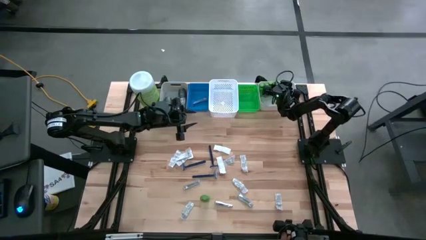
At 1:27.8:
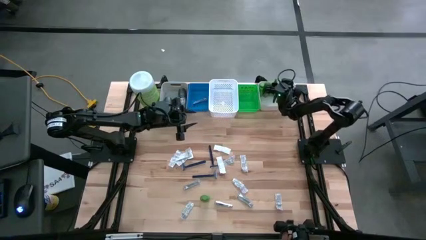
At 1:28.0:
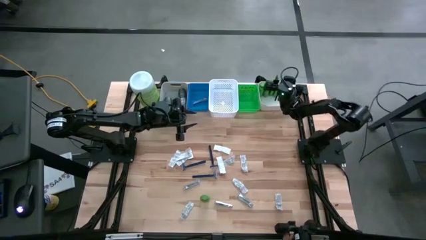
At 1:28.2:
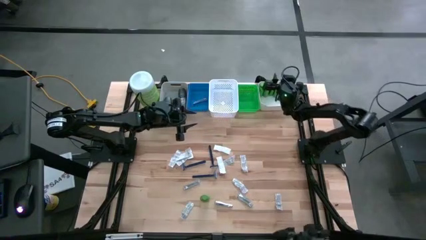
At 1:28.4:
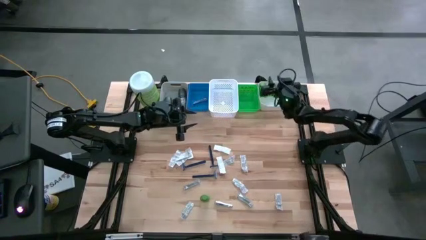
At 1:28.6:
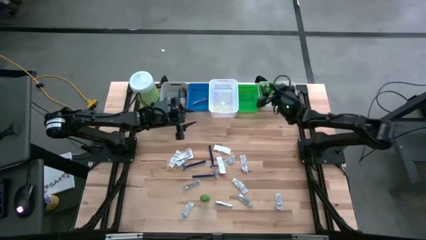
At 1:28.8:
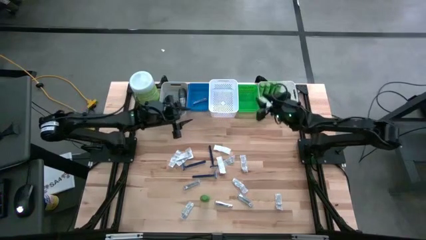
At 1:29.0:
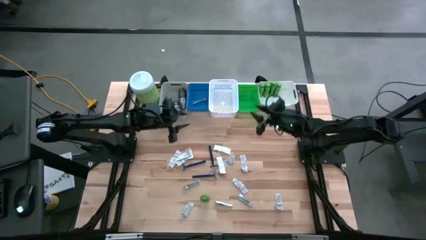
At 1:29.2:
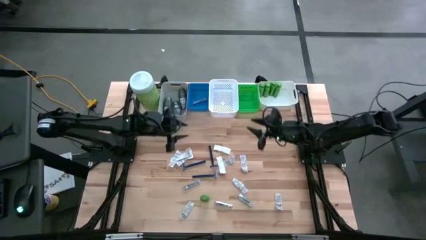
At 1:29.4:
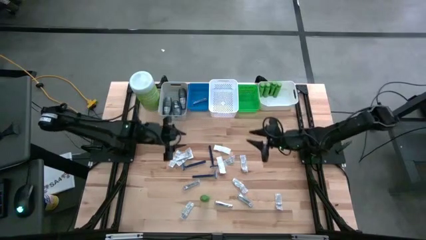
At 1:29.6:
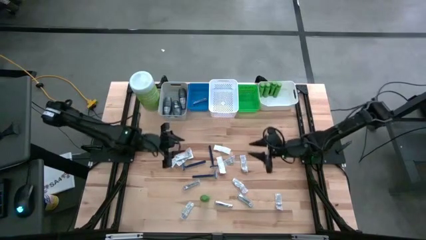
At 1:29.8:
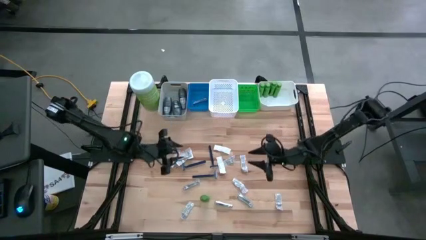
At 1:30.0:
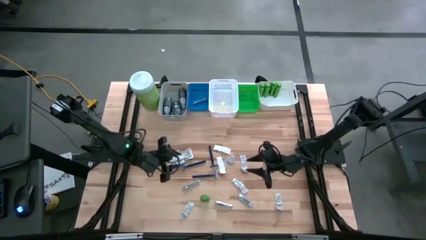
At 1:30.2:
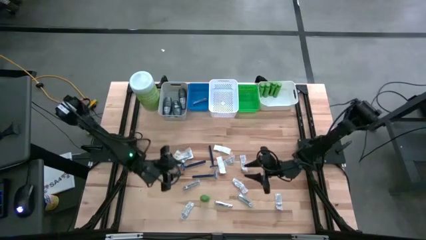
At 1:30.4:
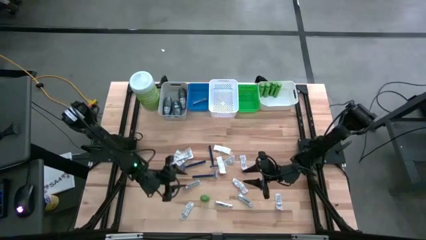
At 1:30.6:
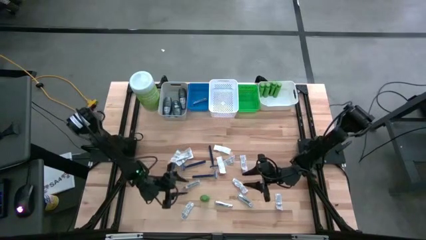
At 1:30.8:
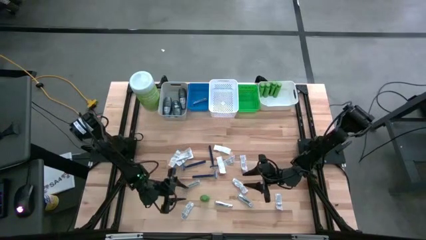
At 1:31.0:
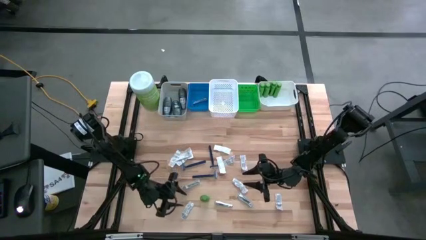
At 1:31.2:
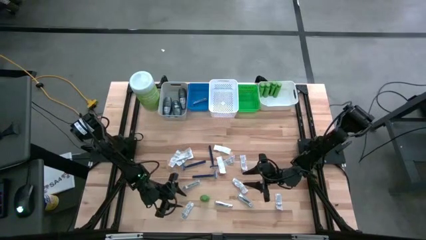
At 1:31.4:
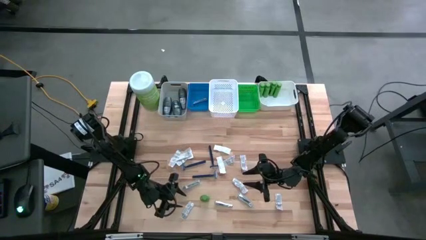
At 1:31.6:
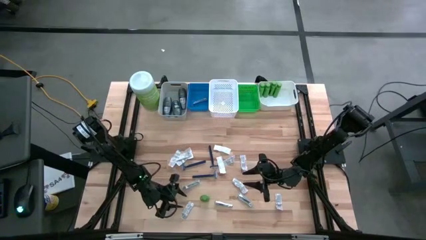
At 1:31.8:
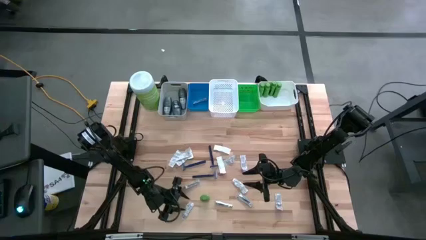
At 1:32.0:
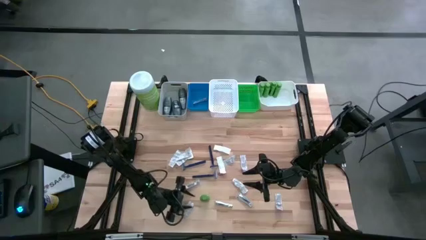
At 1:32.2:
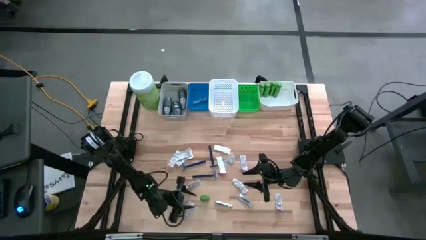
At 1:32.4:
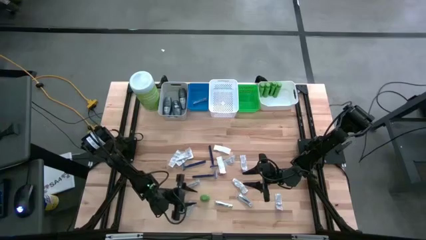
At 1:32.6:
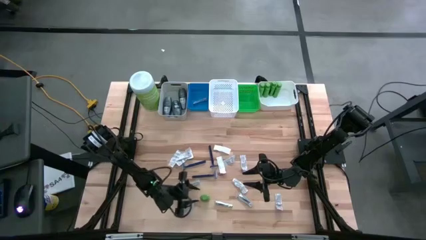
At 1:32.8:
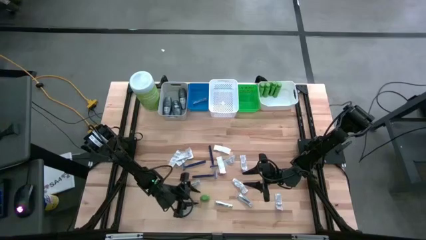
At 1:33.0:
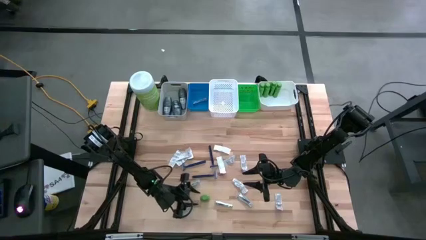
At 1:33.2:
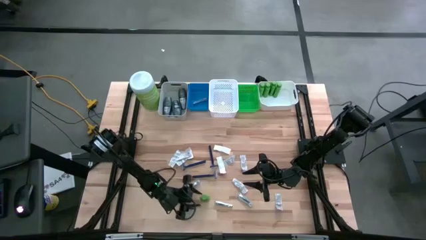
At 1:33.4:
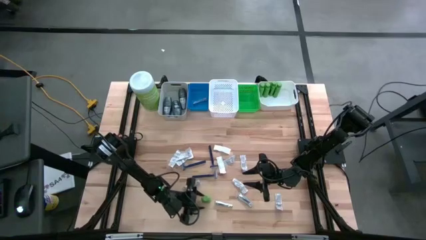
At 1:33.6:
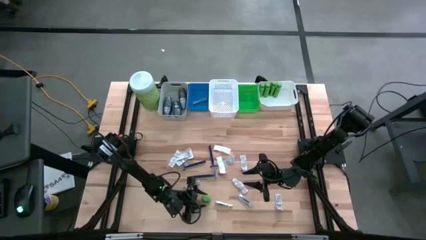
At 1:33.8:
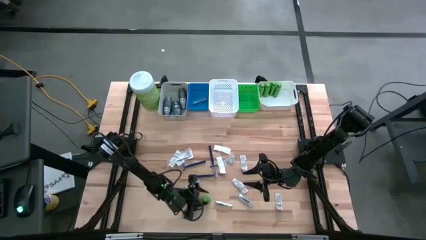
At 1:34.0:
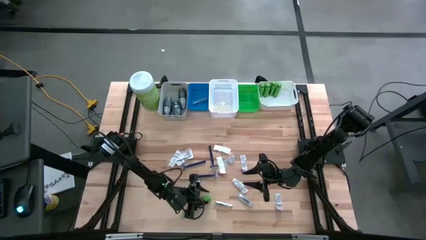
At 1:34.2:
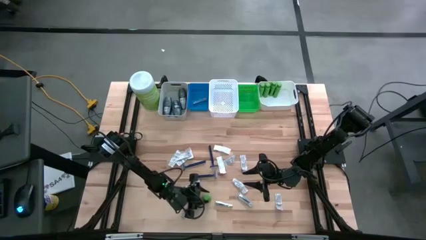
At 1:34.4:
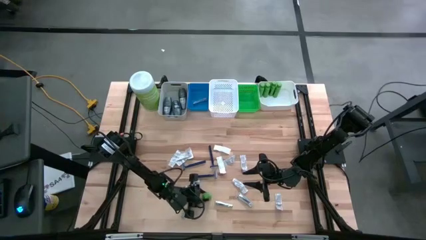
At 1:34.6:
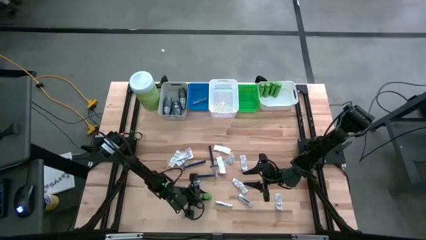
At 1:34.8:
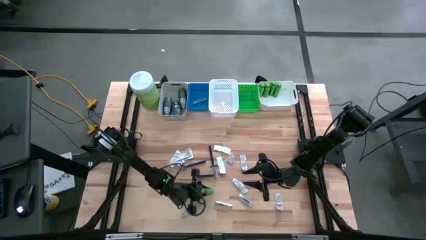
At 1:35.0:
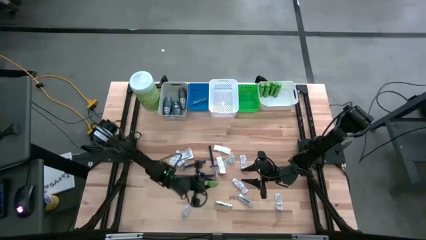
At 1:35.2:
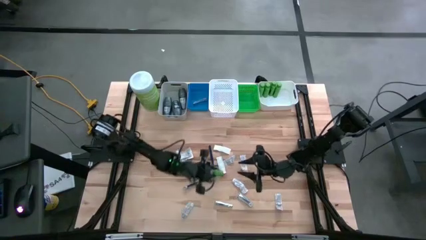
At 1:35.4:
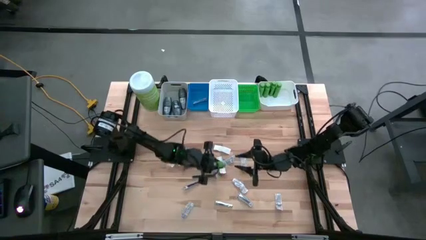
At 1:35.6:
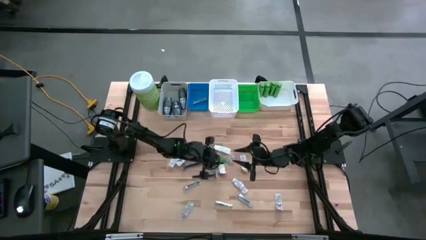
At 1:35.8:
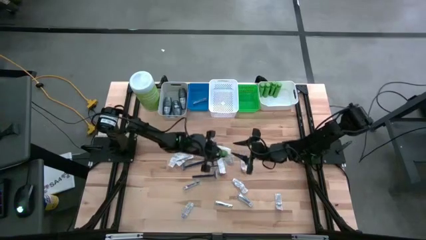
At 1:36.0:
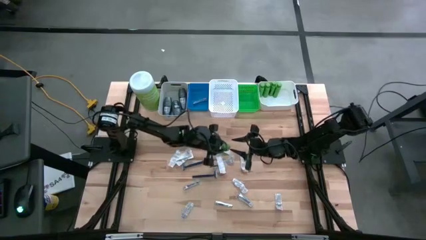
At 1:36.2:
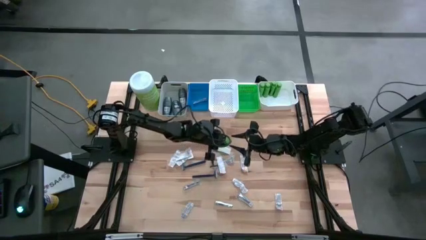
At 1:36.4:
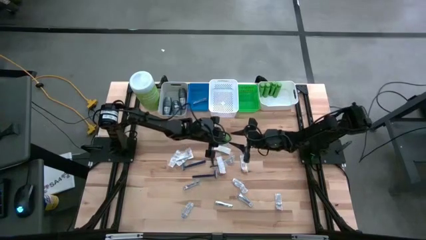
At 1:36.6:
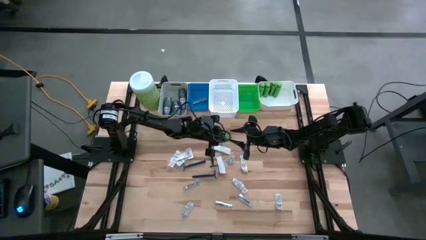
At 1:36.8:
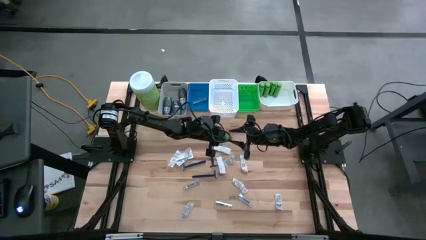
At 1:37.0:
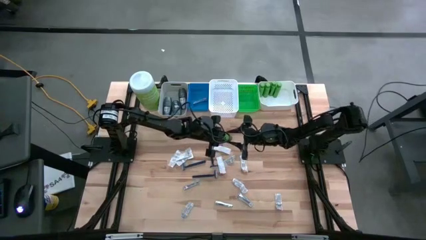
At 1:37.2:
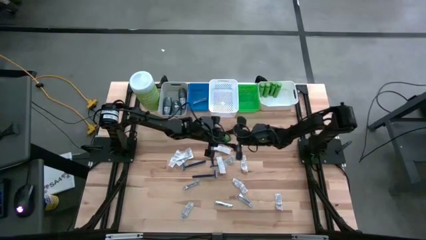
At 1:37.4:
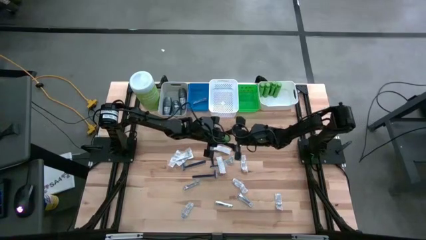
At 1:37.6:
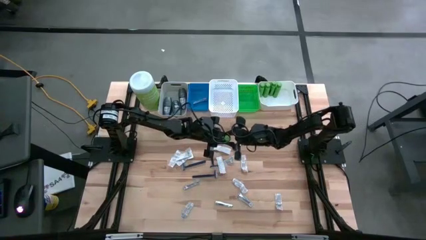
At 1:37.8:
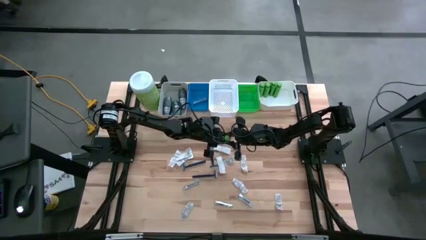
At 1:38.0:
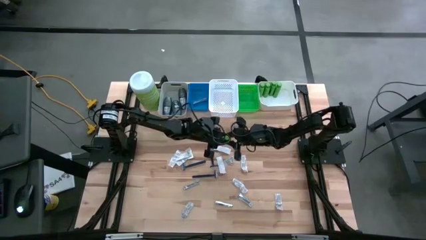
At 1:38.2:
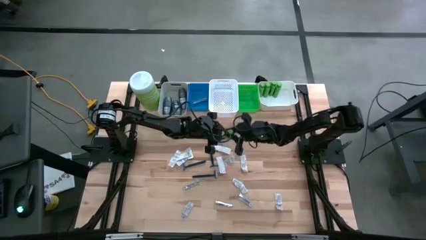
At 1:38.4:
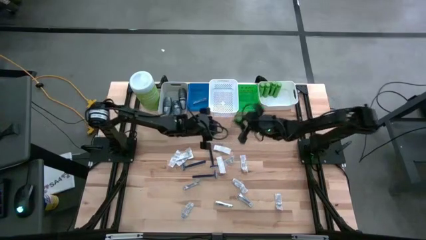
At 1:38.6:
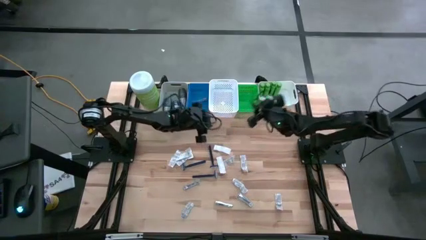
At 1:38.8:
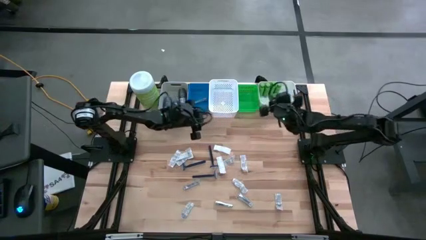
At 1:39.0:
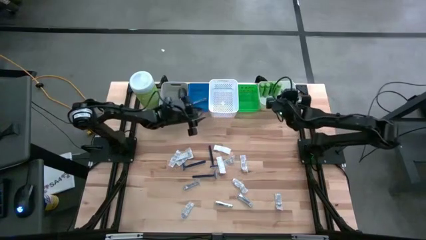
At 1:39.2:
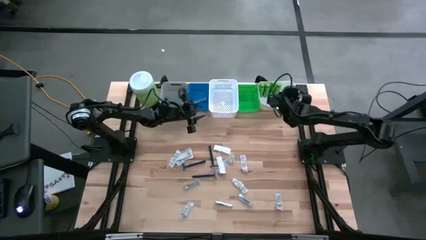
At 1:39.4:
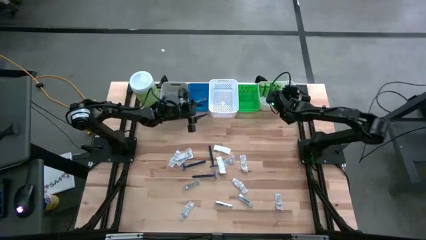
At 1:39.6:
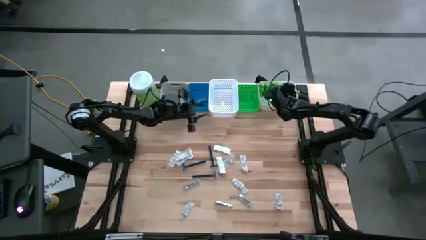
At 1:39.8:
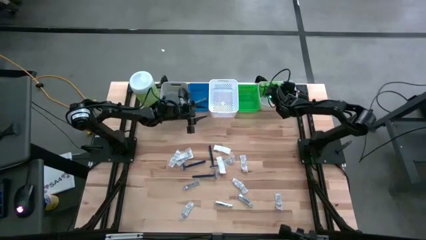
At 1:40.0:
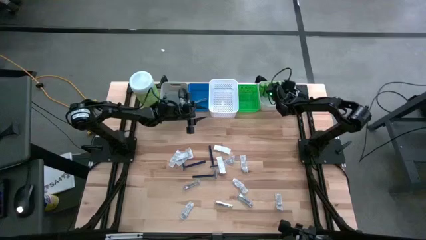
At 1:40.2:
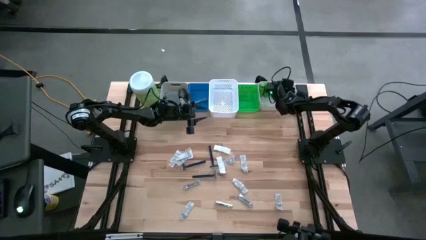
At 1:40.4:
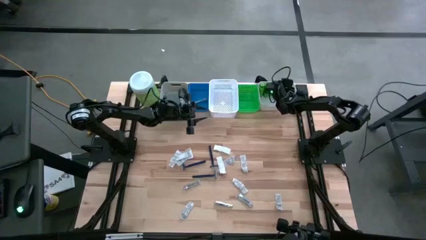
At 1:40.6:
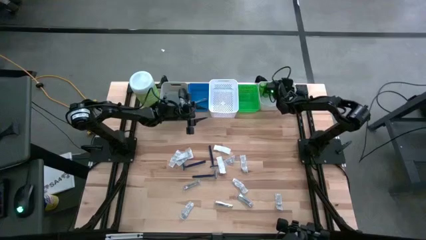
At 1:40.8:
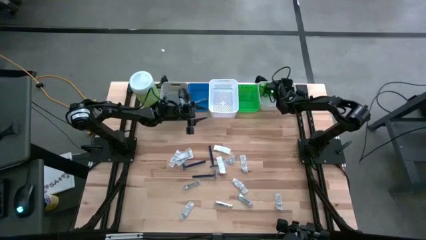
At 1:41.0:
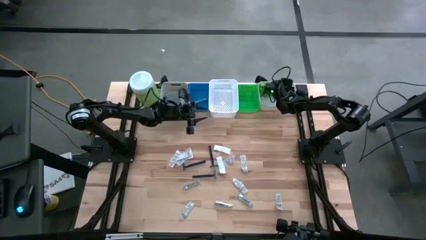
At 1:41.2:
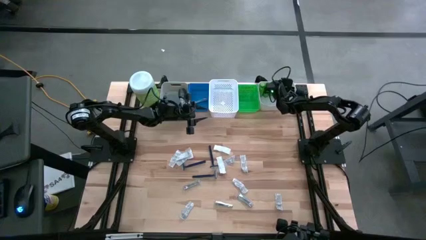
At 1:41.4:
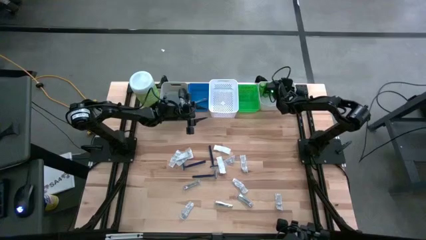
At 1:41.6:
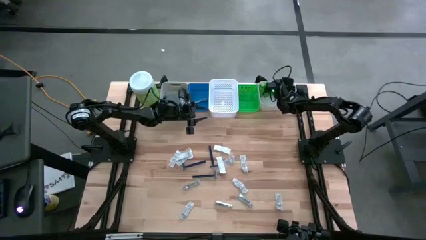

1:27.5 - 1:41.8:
Task: Pick & Place Travel size toiletries
Put the green shampoo into the right white bin

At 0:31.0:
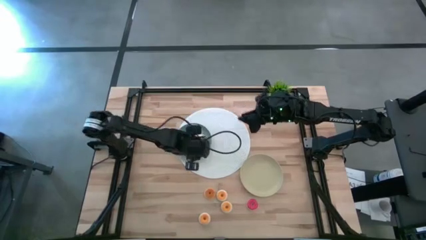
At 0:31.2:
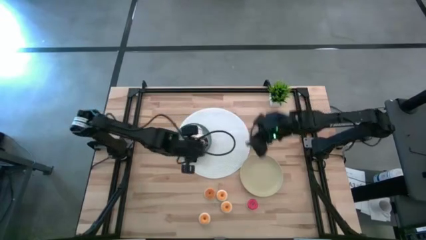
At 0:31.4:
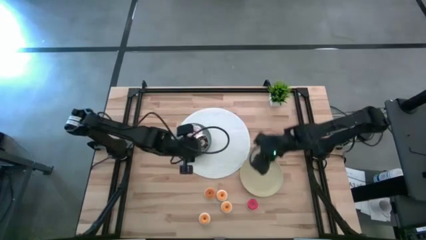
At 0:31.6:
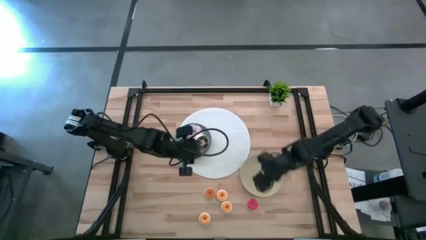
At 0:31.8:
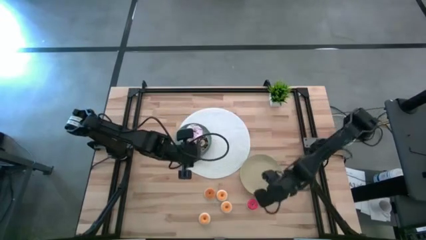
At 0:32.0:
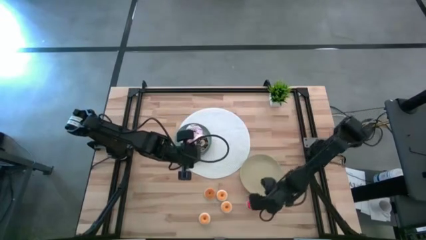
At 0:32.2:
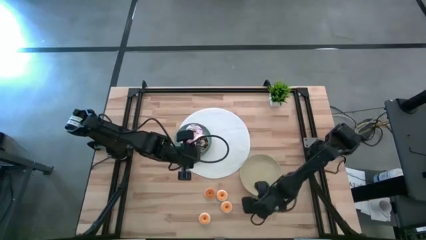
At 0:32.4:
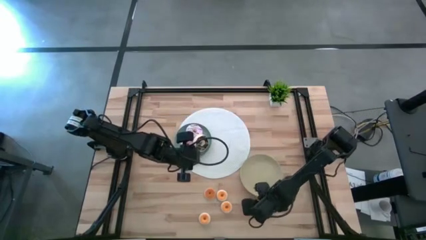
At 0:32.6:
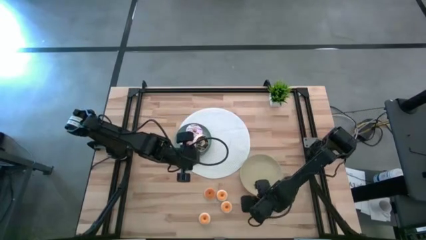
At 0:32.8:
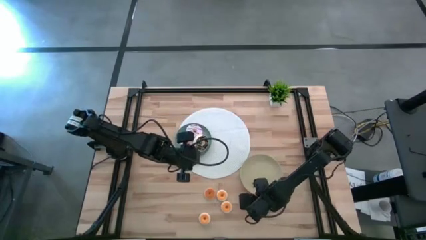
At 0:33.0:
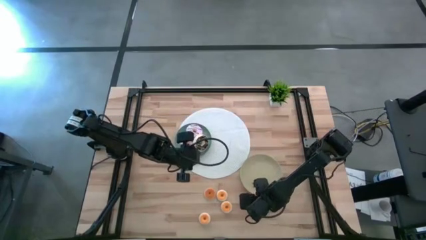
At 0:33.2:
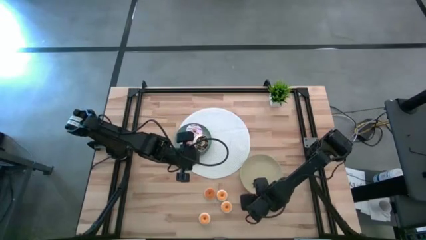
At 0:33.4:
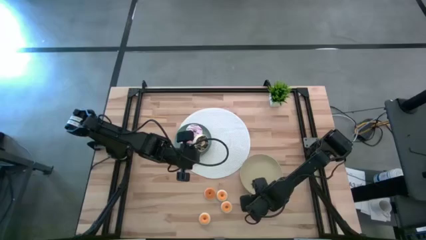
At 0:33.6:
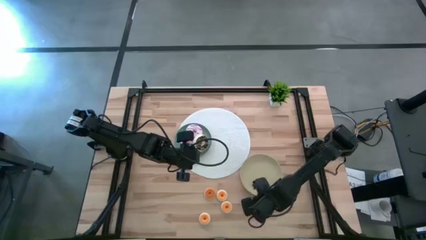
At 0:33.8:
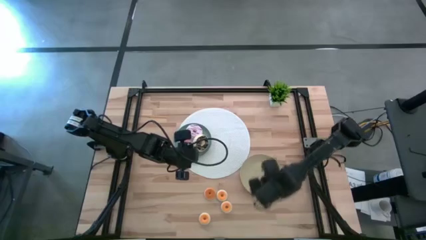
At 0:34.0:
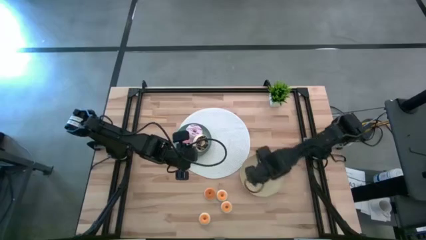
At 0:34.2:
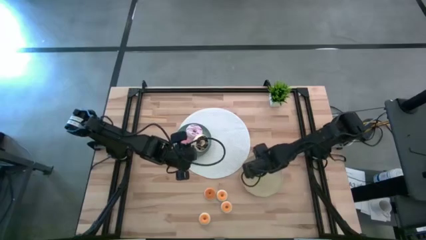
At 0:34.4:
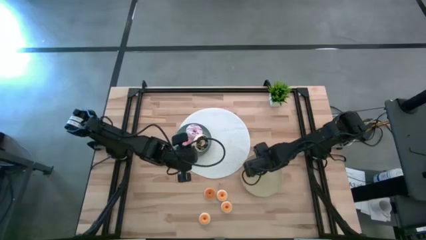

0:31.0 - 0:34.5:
Task: Pick & Place donuts
Put the small red donut on the brown plate
